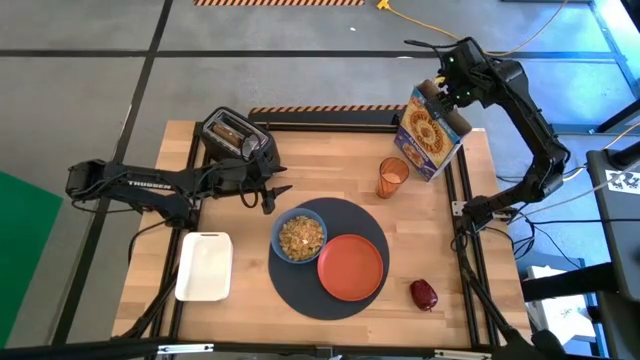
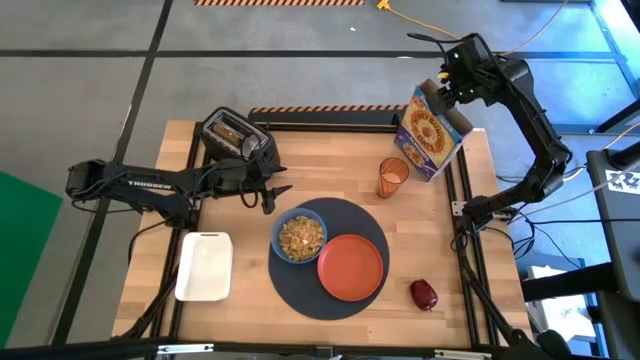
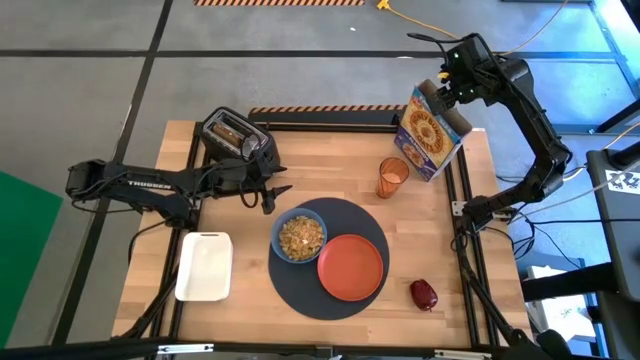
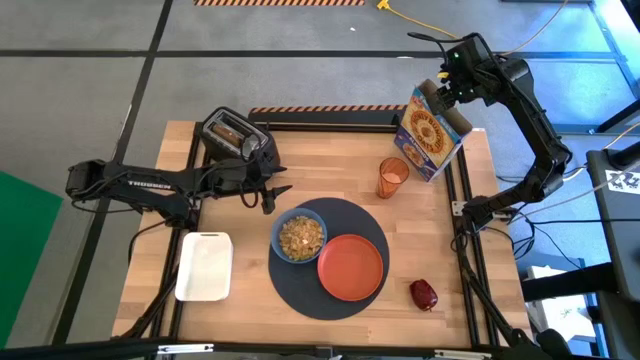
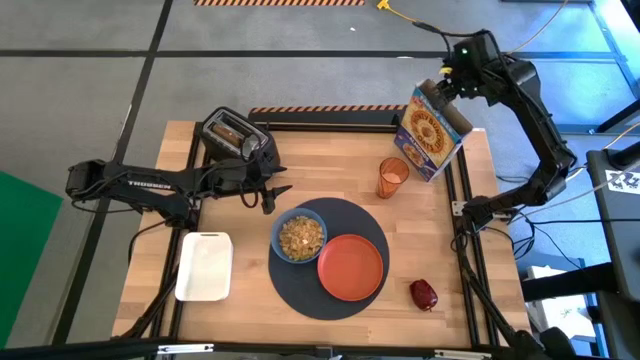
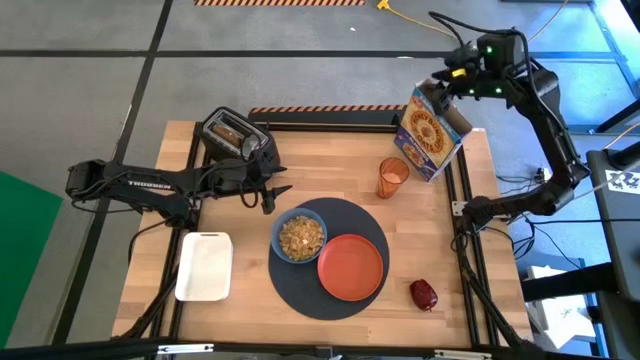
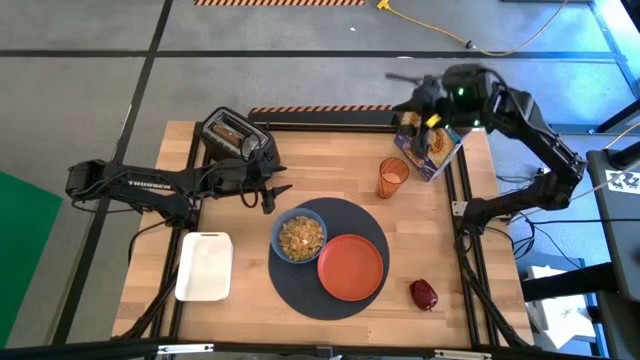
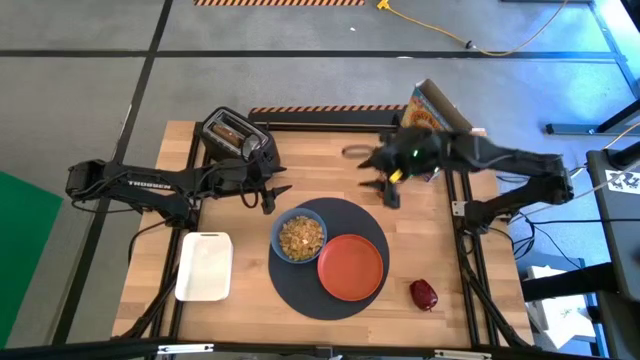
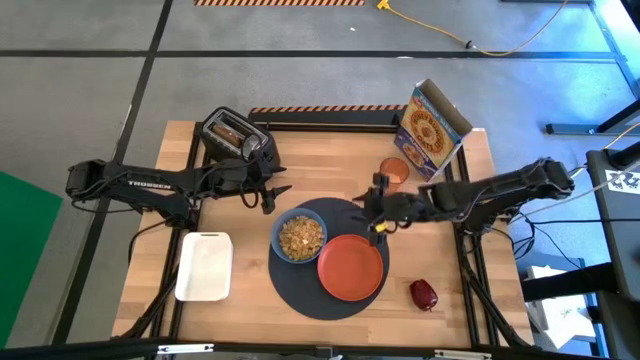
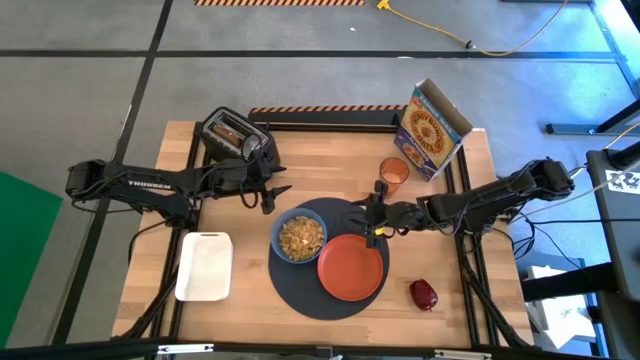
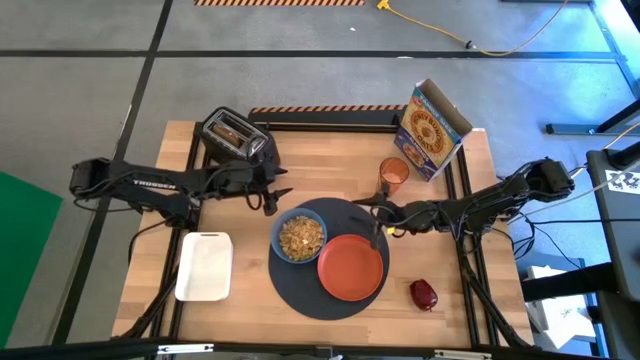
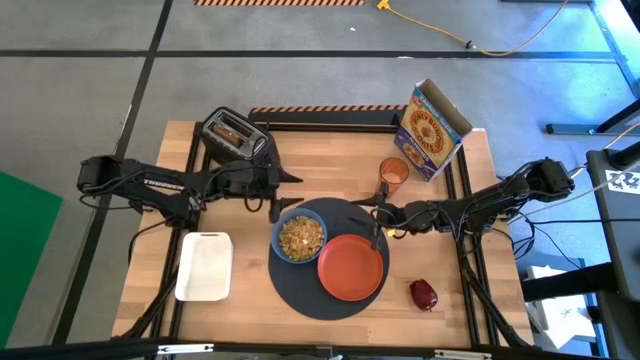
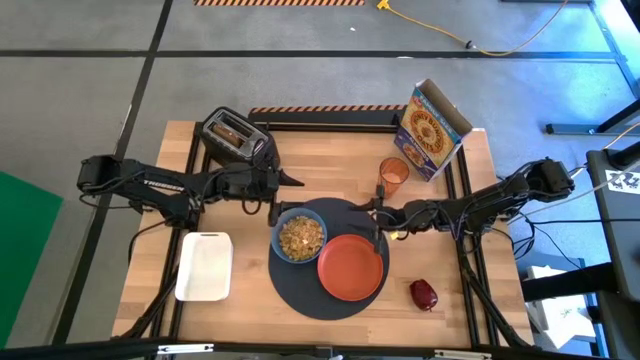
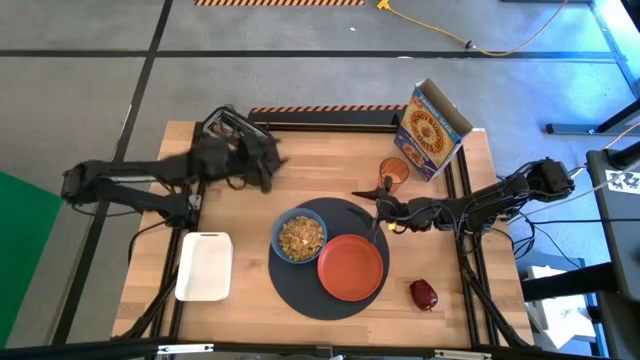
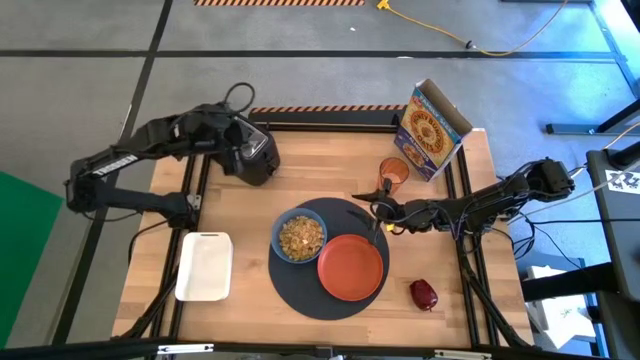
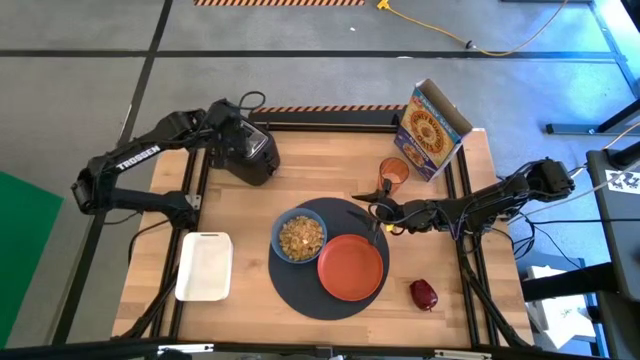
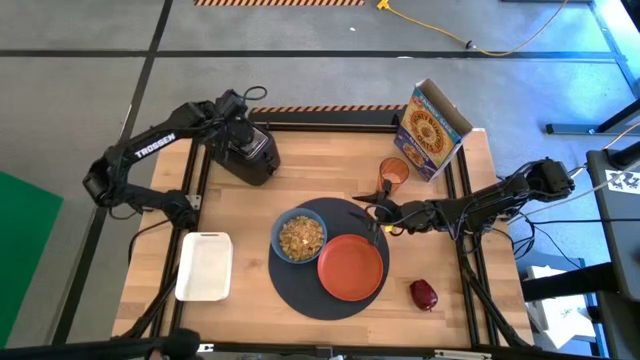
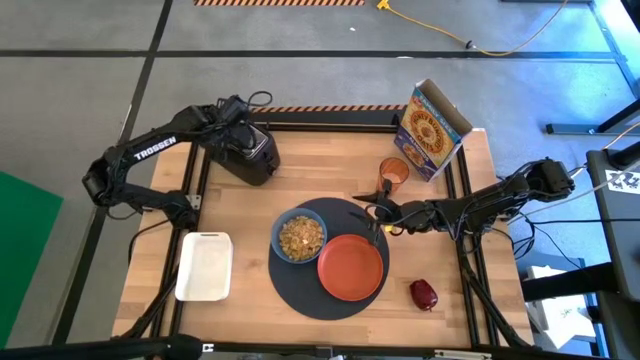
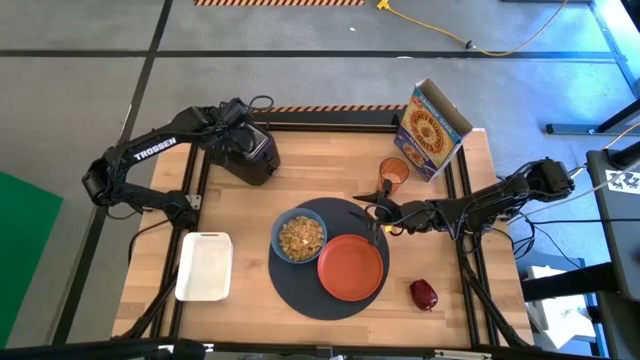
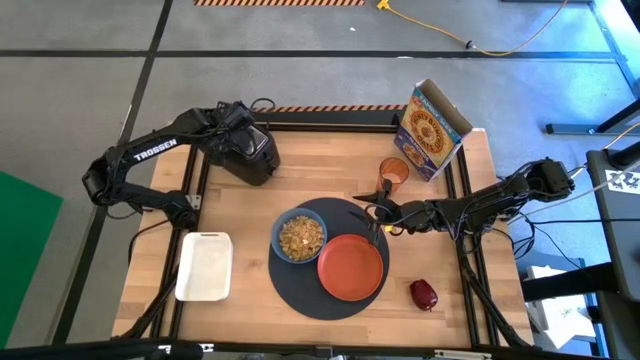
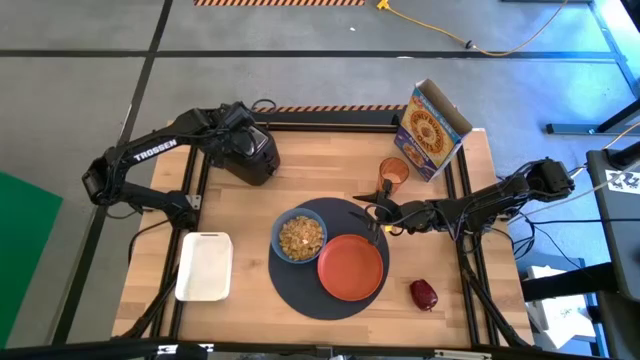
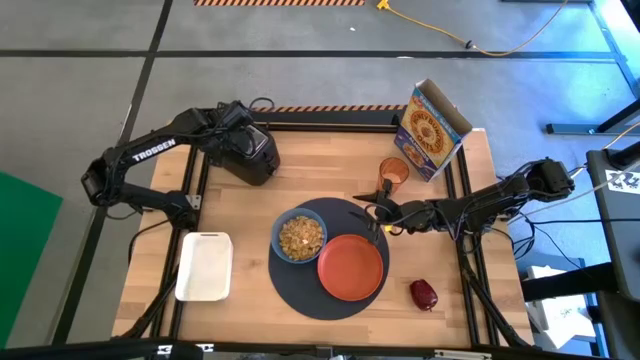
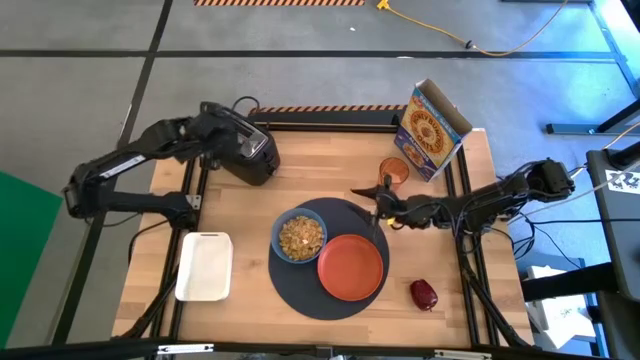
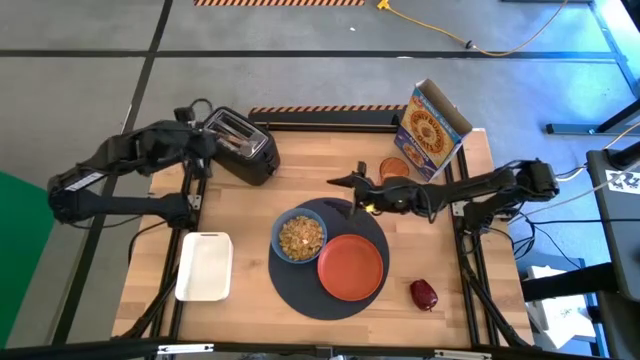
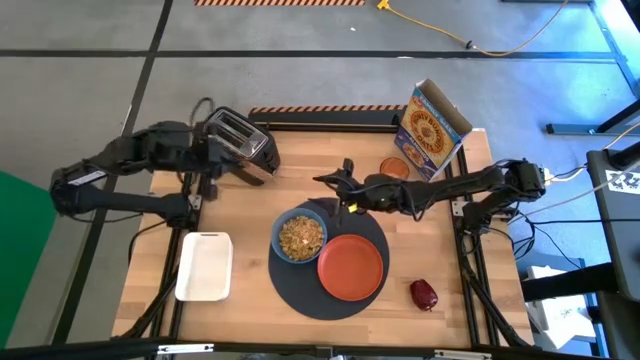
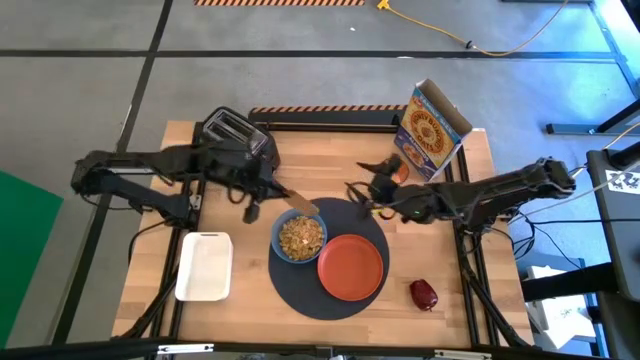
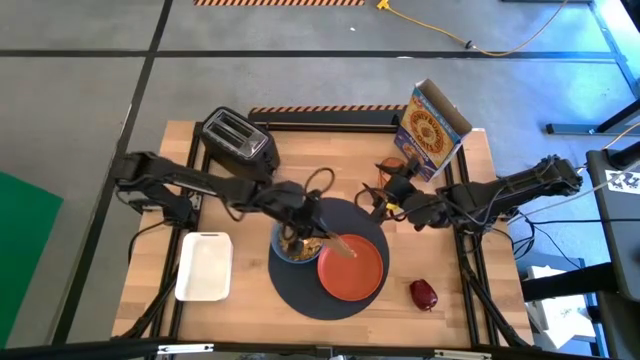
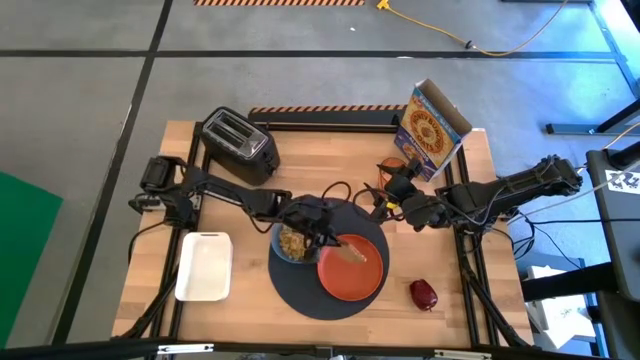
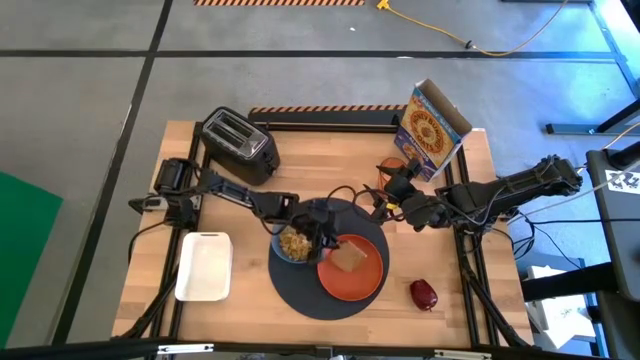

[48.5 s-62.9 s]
Task: Arrange a breakfast setting
Put the toasted bread on the orange plate

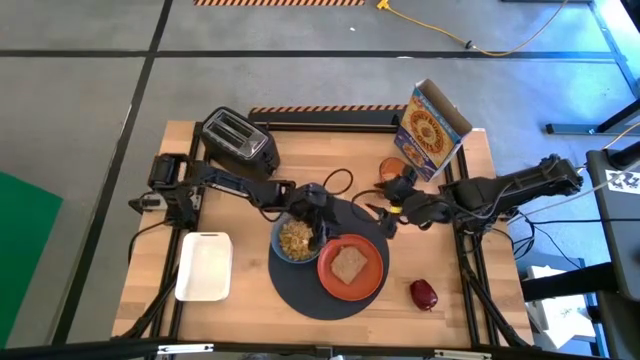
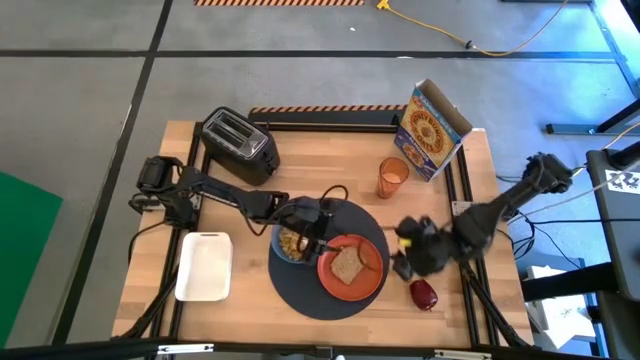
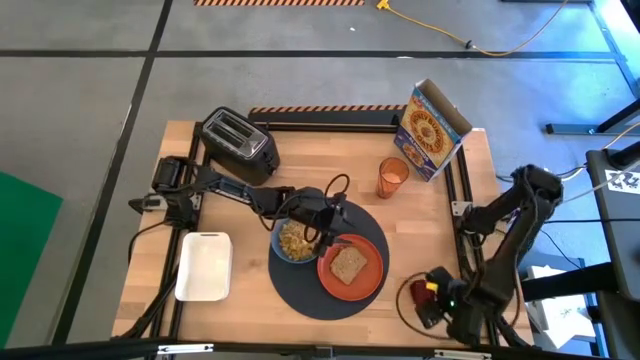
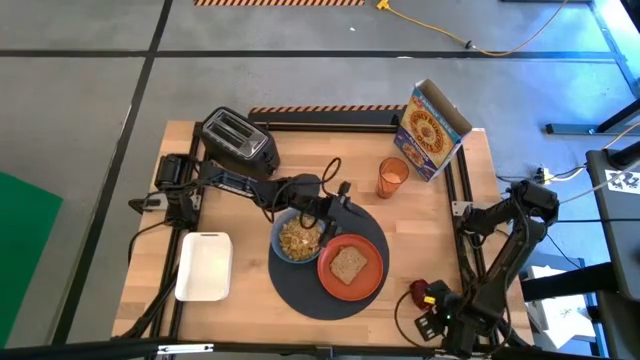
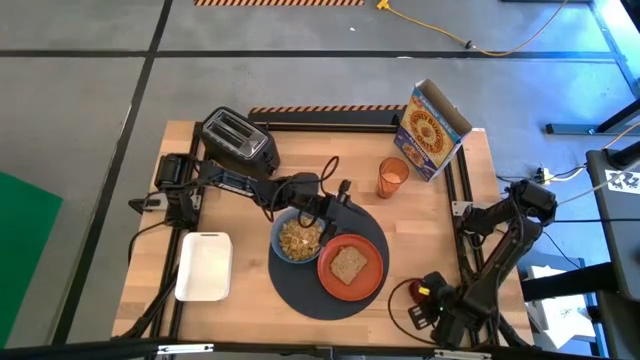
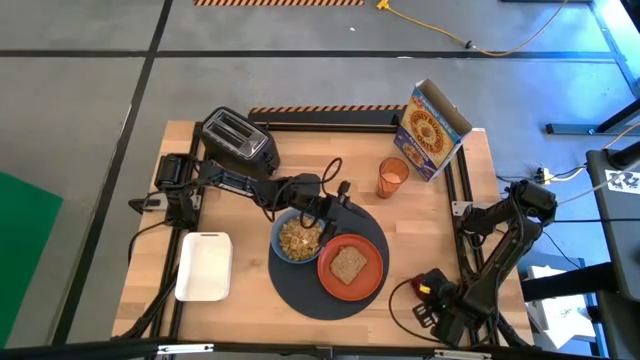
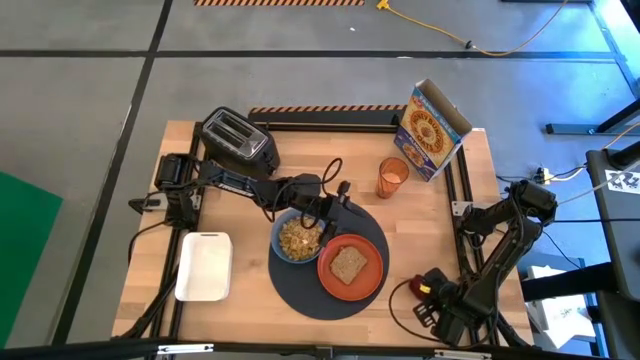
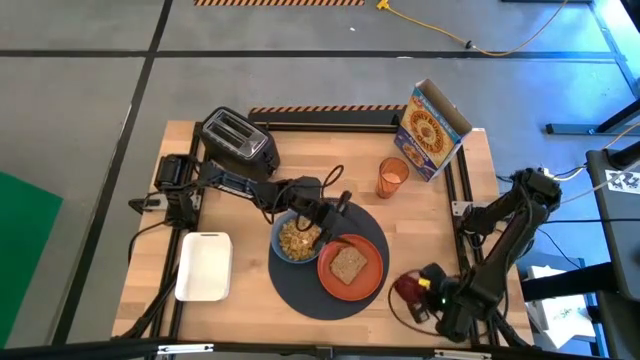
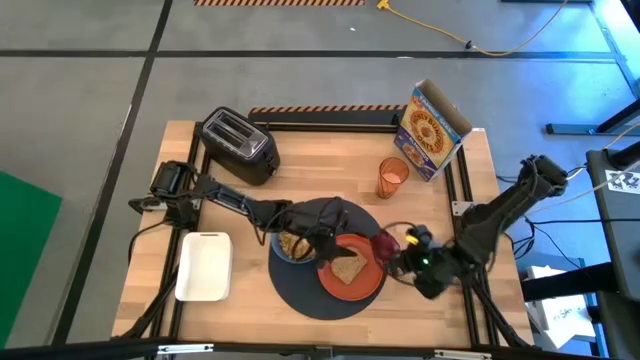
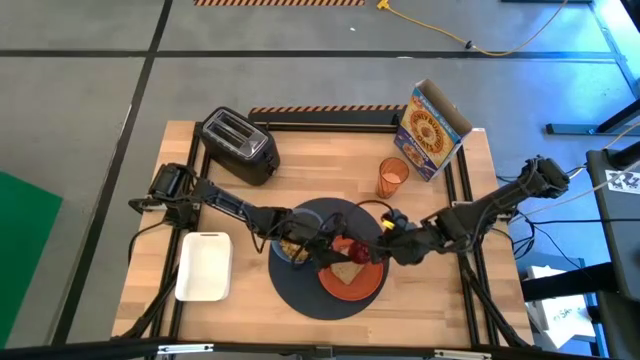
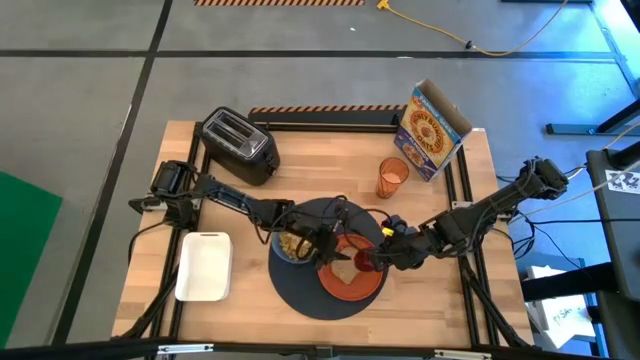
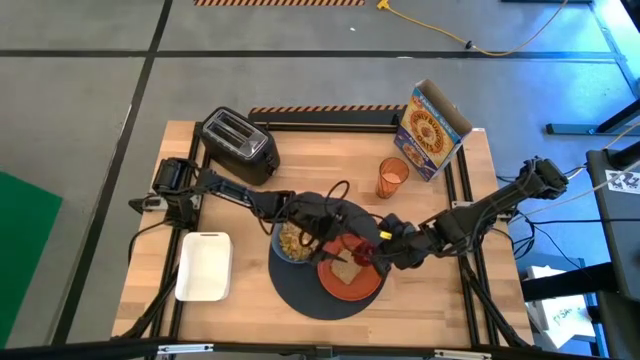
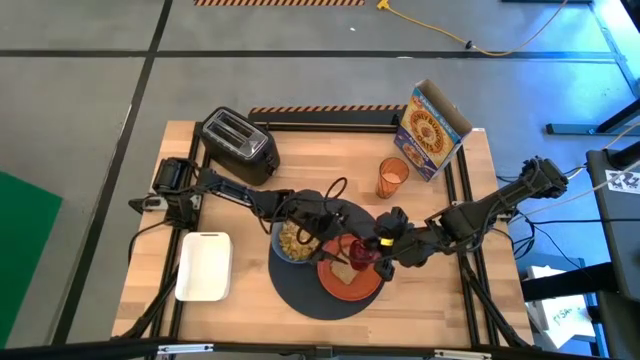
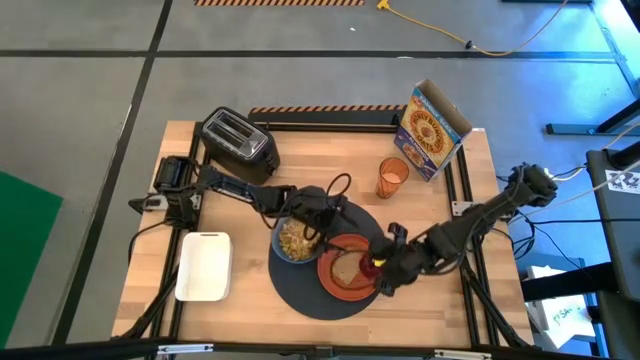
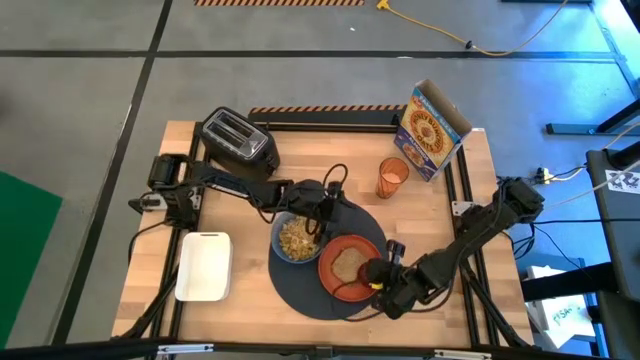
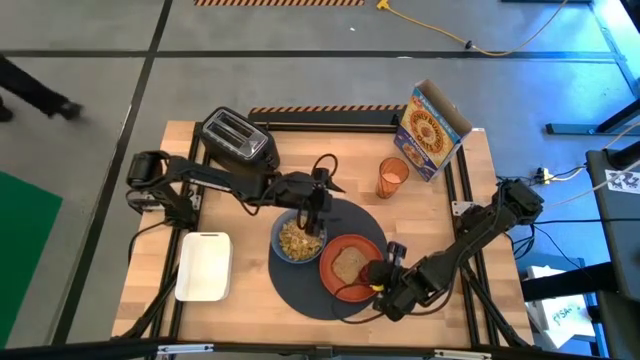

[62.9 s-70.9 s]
Put the apple on the orange plate
